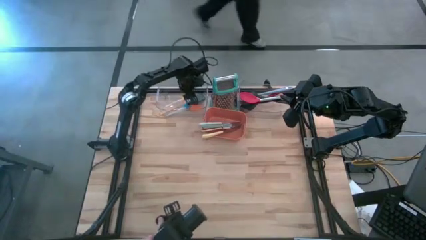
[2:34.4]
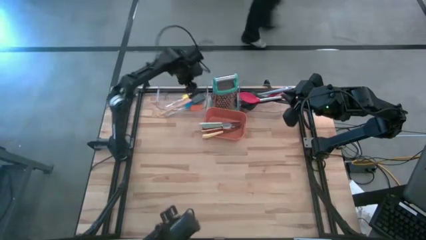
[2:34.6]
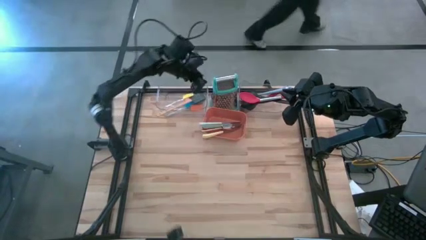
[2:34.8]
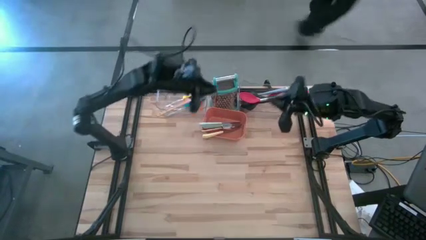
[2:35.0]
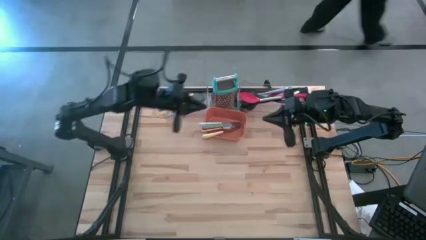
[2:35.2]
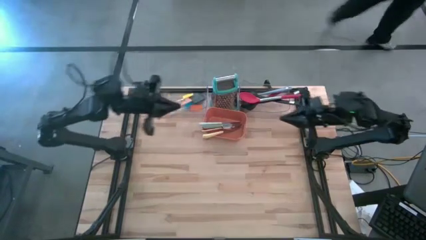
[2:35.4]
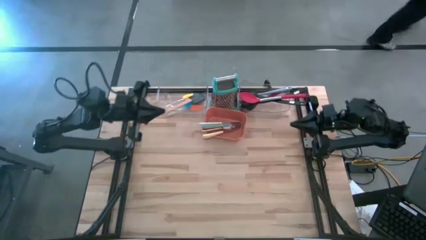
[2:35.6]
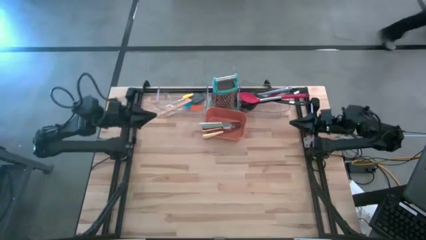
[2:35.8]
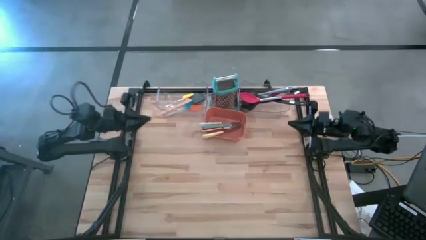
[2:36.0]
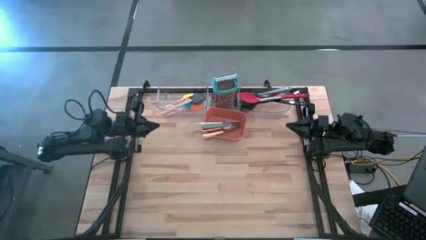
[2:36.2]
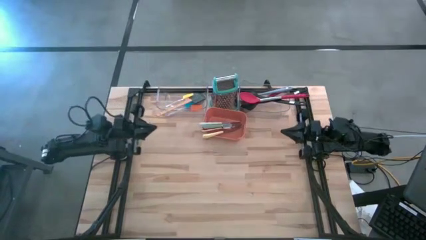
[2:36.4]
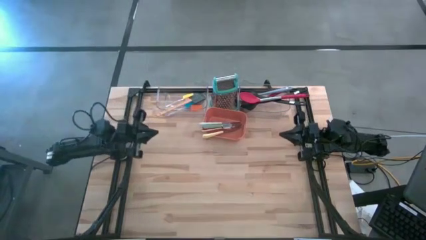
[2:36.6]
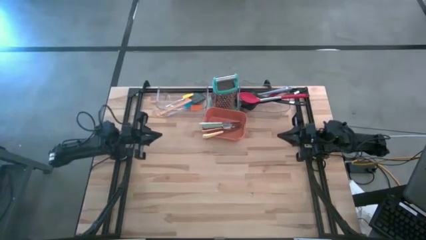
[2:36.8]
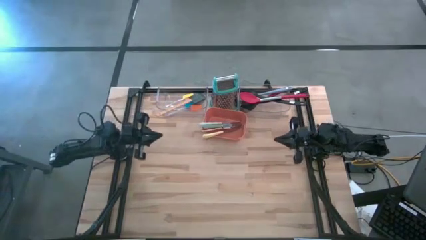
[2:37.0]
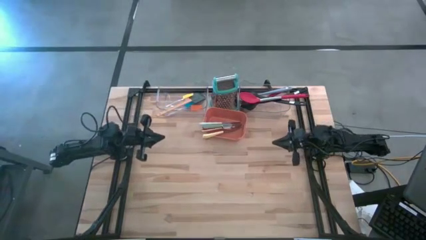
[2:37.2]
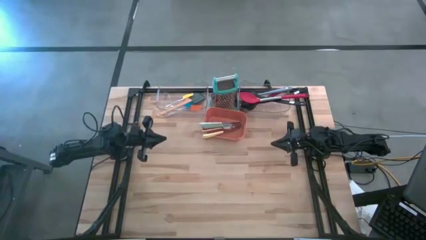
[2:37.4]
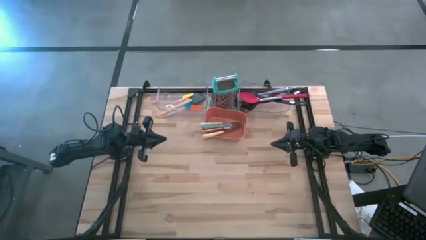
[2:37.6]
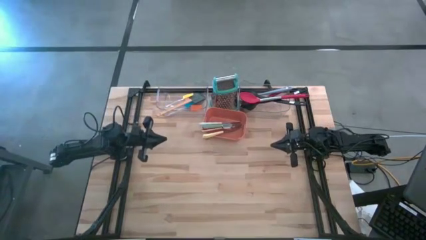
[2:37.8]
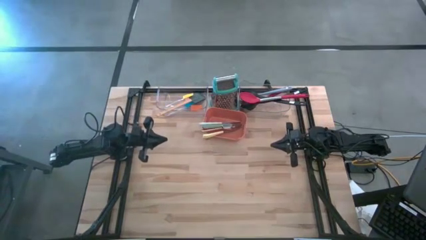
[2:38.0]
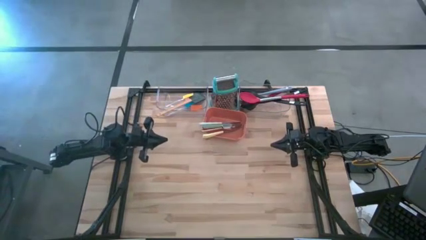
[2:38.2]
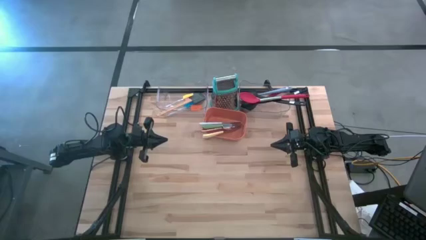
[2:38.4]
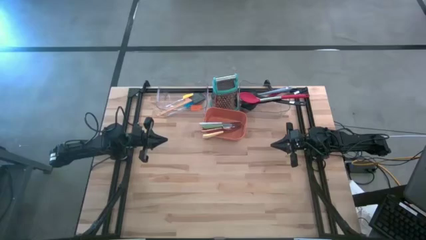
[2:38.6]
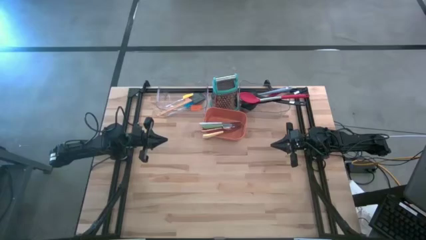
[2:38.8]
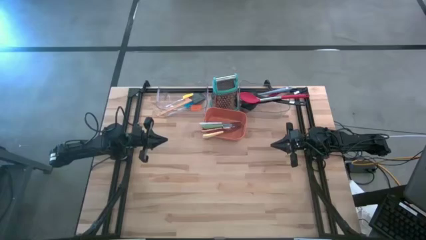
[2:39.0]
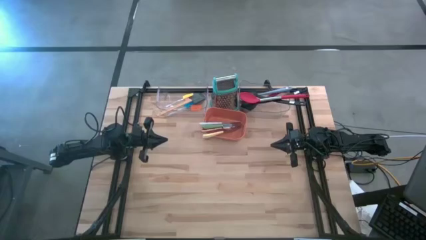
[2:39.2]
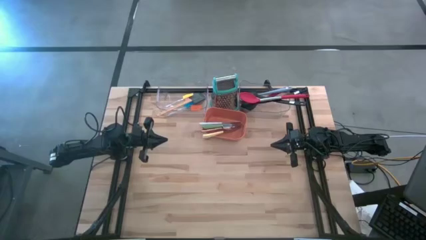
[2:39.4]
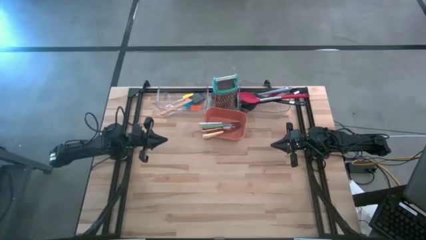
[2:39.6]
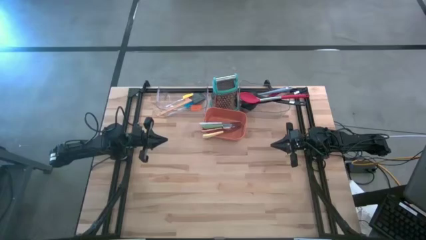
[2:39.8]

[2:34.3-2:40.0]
Task: Pick & Place Kitchen Items
Return to Home Position

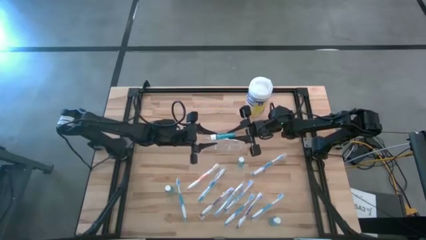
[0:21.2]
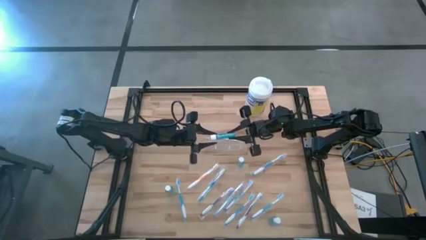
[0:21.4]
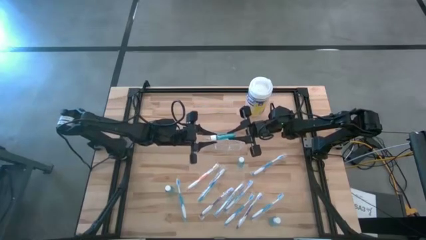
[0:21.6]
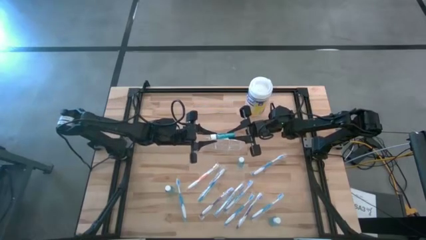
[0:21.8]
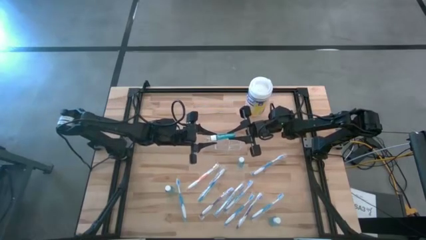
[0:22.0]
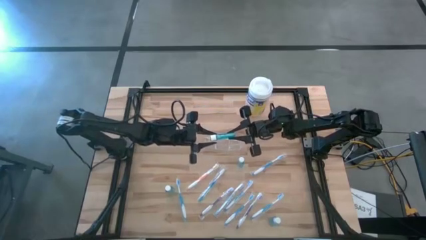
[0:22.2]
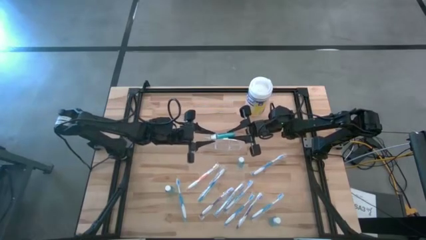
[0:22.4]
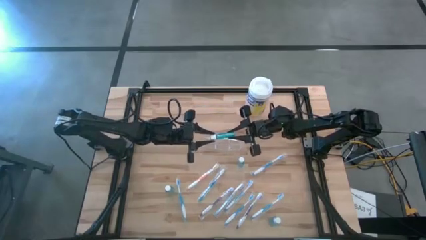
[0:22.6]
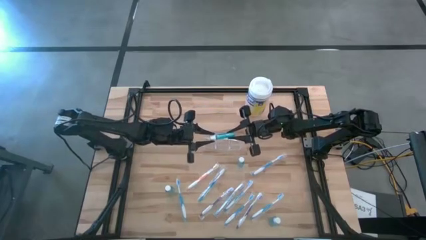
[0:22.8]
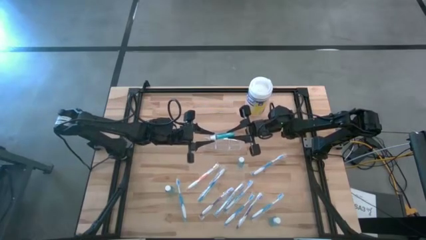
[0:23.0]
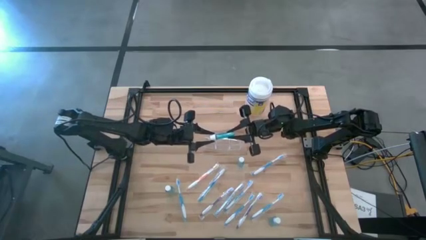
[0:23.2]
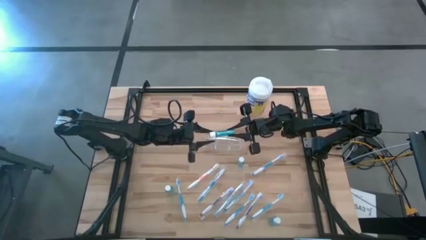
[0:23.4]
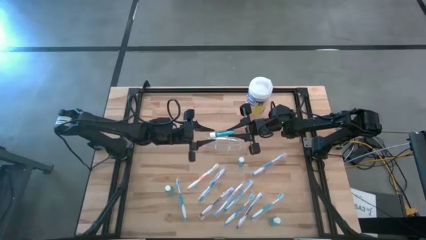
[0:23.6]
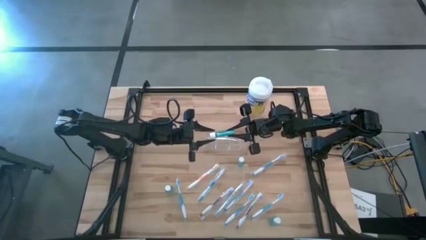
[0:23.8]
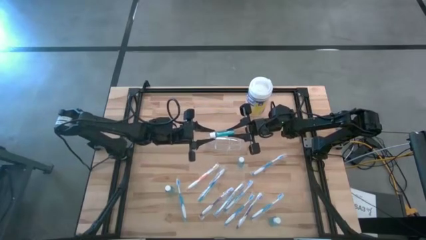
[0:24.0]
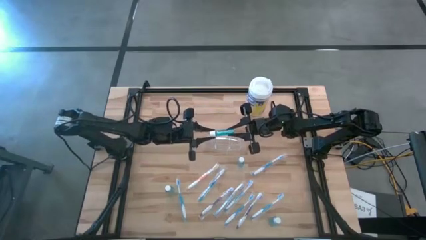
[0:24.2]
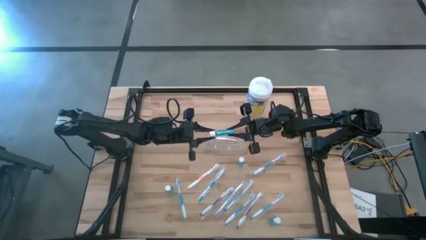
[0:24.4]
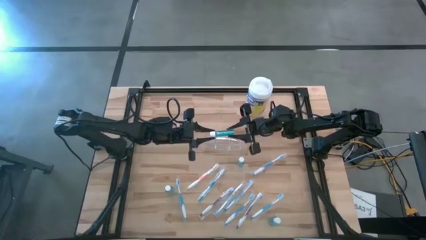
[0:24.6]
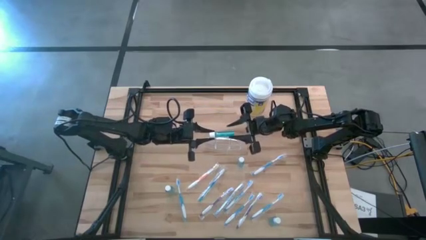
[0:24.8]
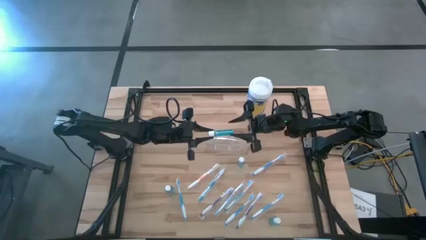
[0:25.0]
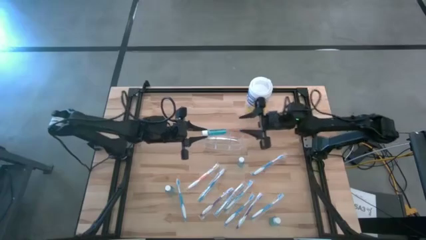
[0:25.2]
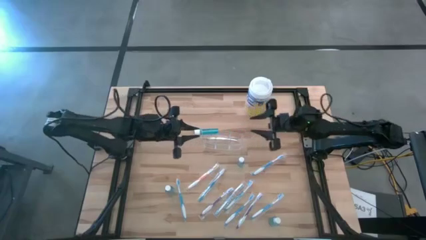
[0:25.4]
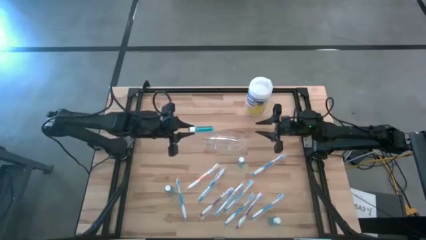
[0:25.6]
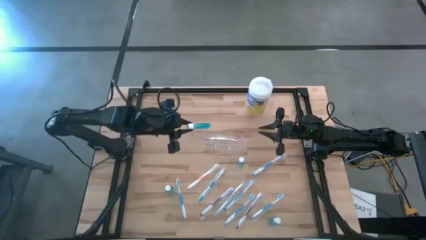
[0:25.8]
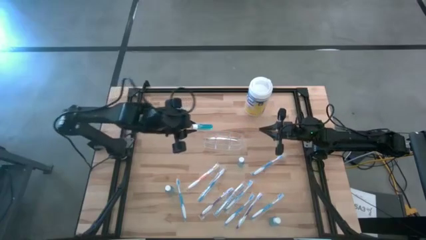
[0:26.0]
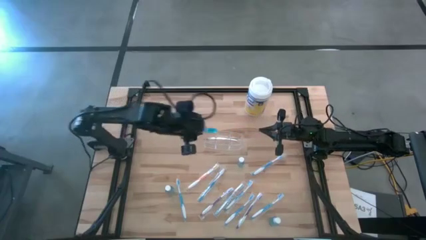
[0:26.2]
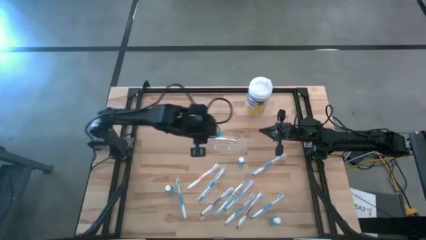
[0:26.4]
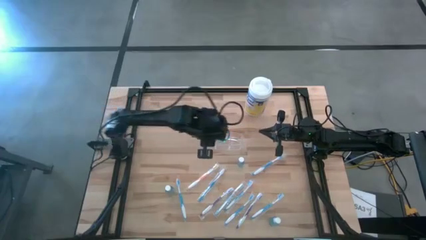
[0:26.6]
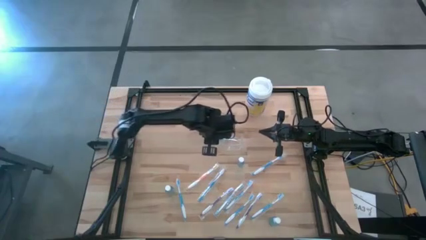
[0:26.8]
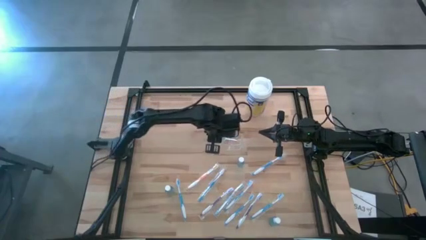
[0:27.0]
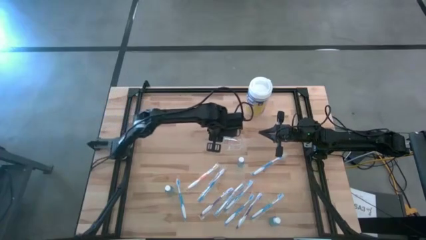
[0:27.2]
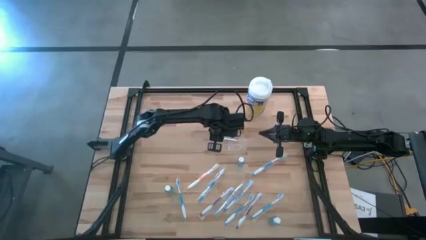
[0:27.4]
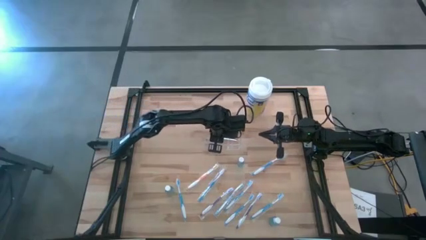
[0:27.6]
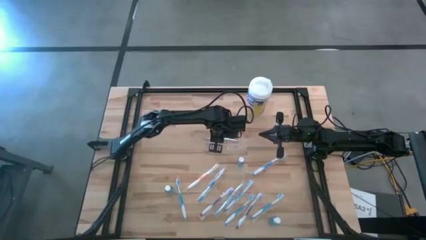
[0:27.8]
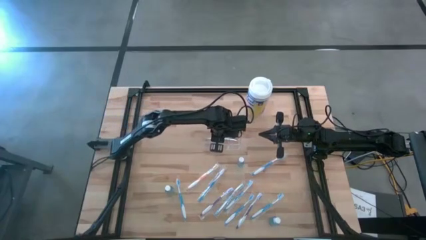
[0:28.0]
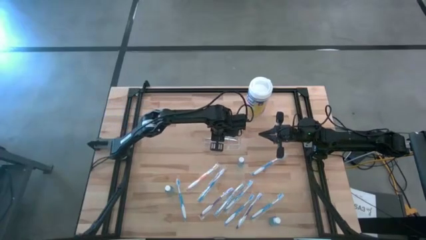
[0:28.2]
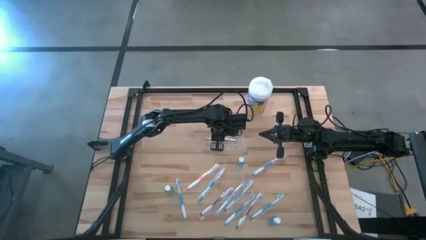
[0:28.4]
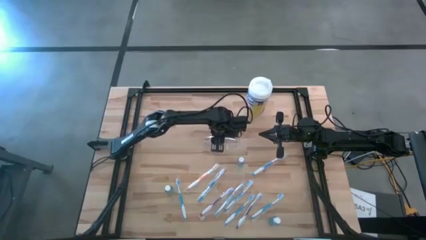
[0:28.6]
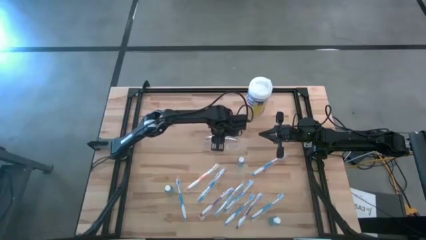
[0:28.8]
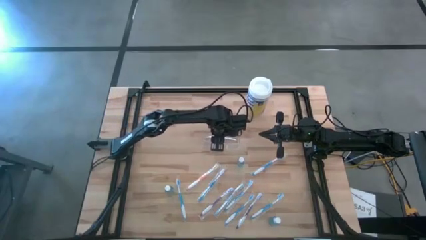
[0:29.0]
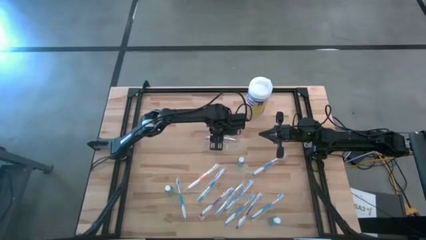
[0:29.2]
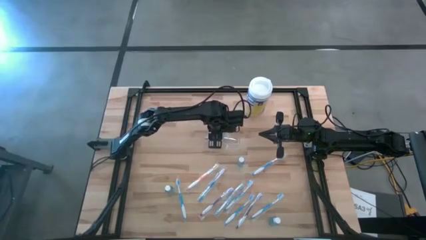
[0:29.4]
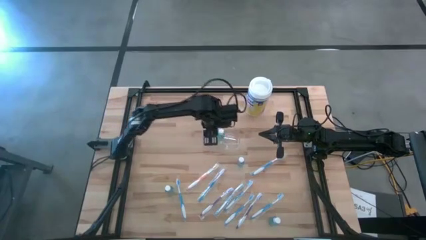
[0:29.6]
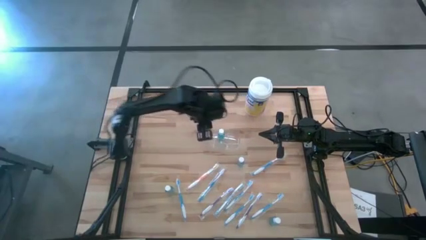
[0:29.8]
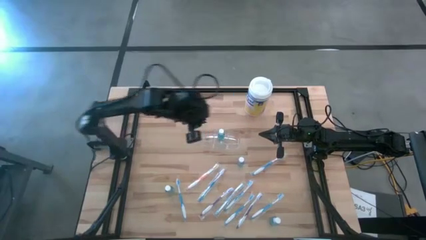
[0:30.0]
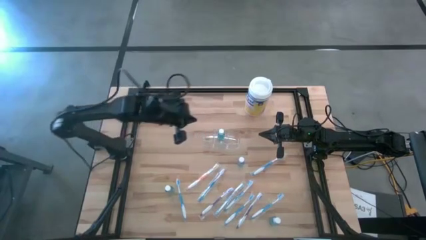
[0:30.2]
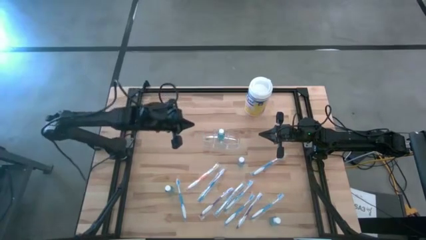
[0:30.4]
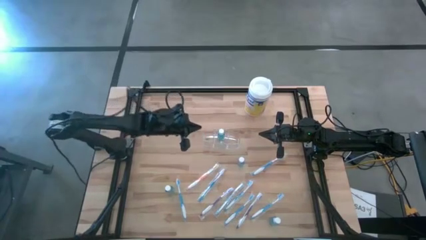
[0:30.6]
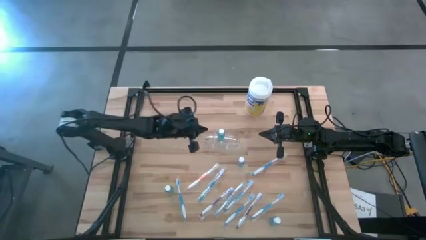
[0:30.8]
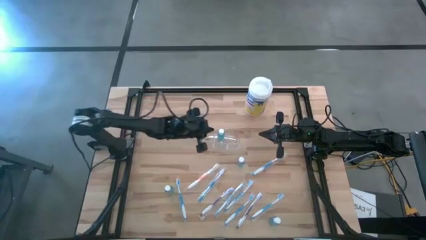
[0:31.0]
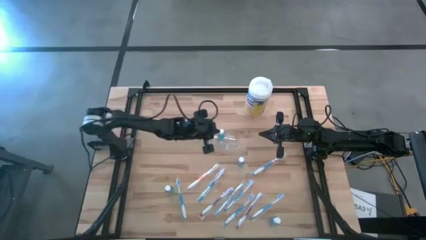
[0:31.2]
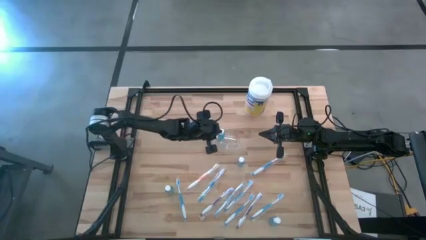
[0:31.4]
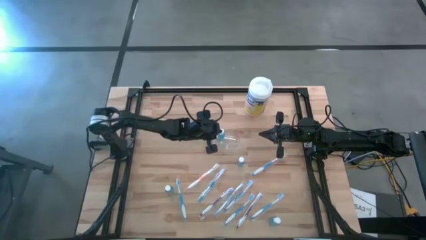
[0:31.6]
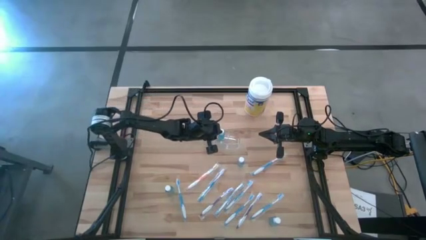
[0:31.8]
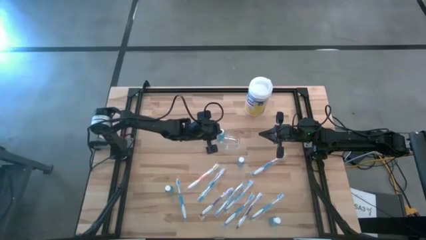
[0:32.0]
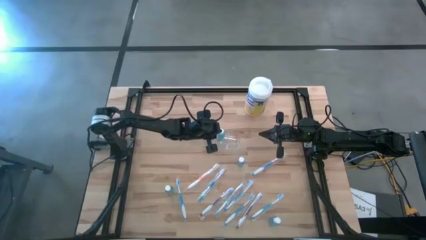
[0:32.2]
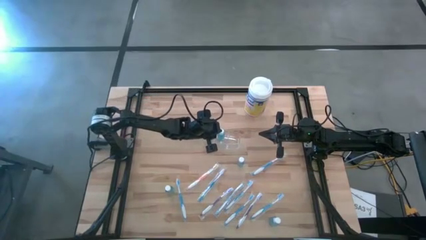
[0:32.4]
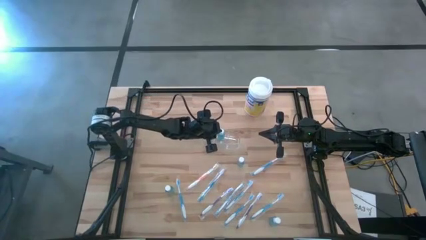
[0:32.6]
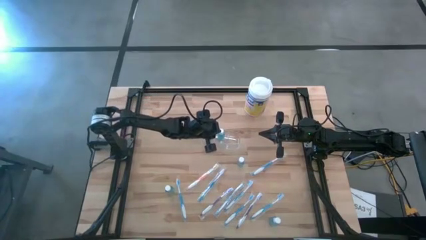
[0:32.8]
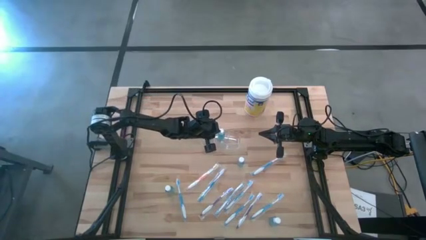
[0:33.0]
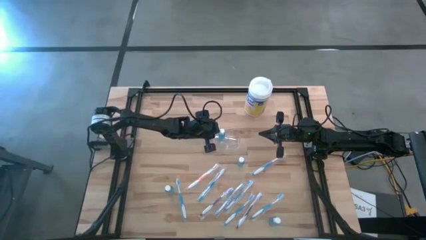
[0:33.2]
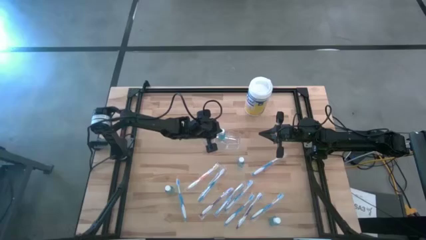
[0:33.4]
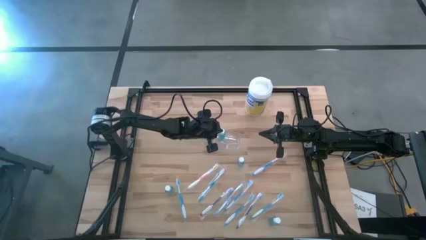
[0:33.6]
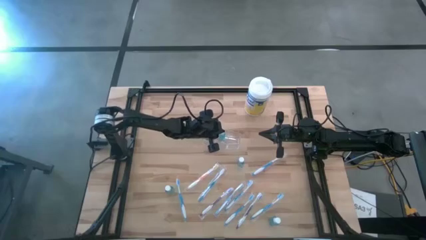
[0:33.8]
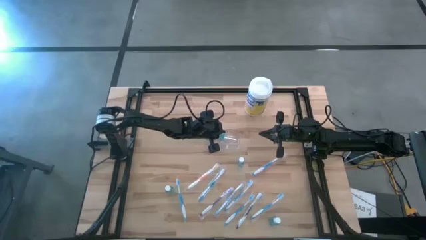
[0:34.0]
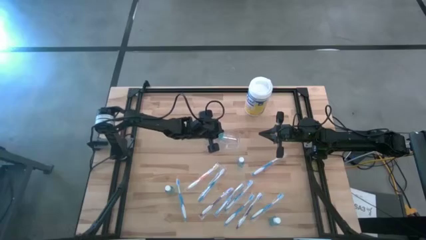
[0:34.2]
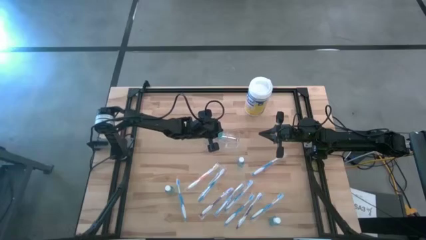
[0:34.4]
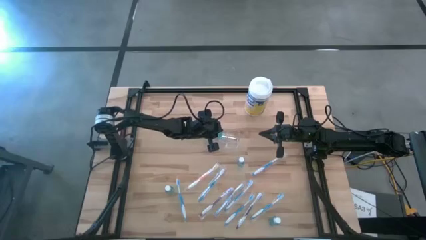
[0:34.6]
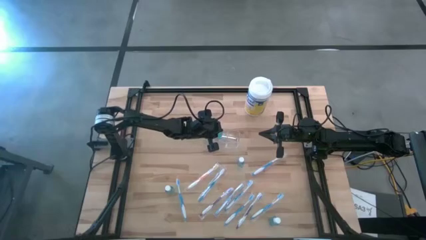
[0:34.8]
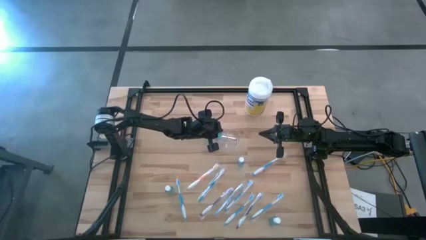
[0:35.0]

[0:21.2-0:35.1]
Task: Pick & Place toothbrushing station
Put the blue mouthwash into the transparent organizer
